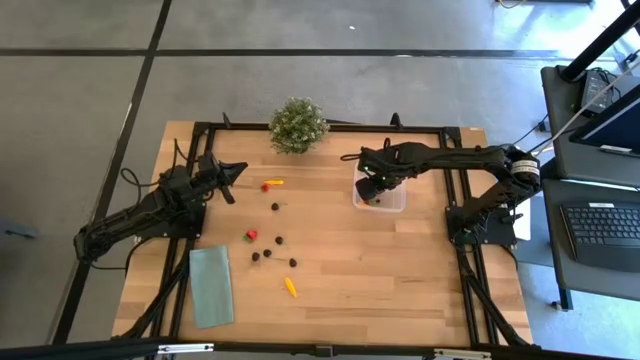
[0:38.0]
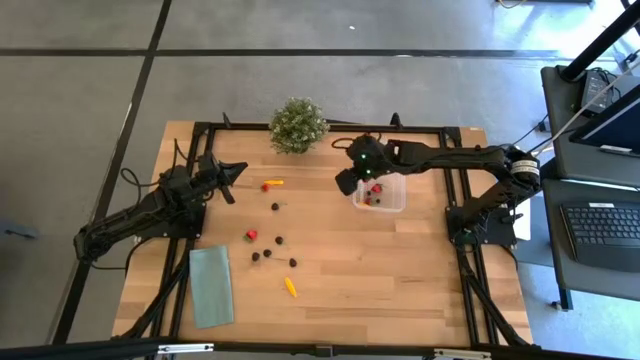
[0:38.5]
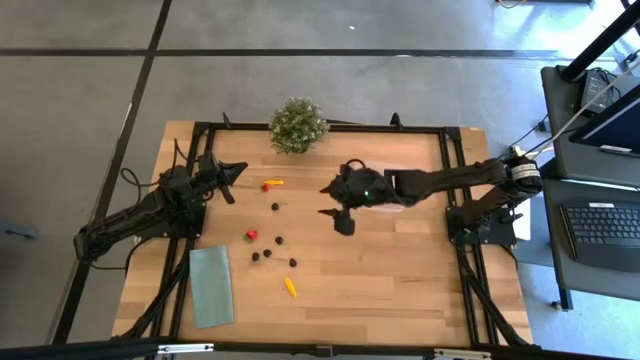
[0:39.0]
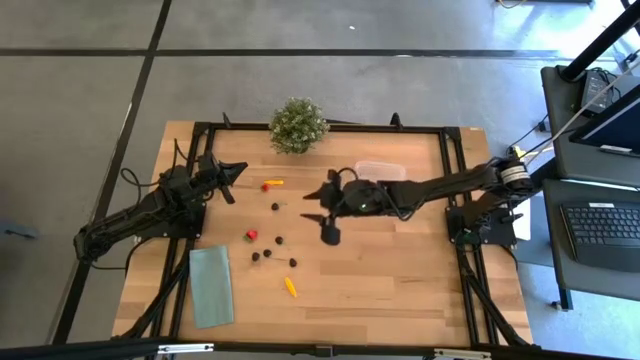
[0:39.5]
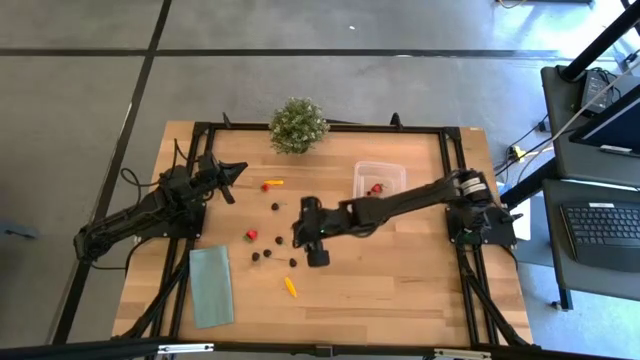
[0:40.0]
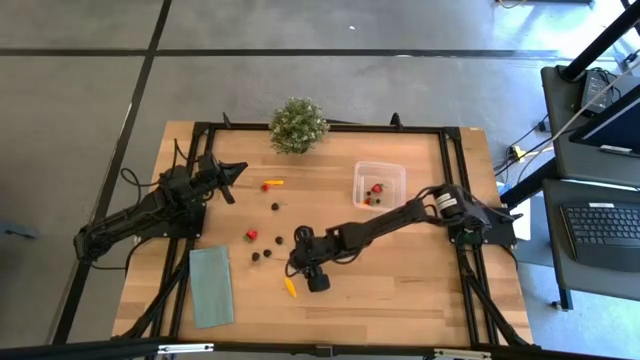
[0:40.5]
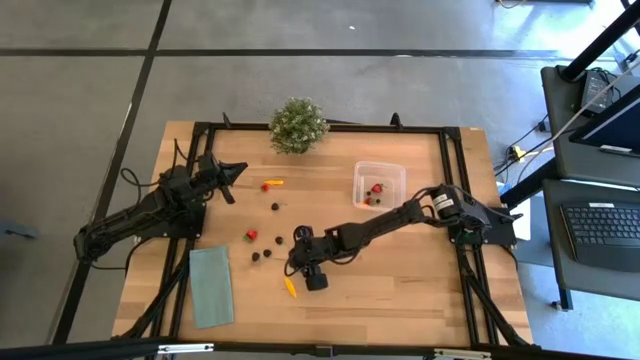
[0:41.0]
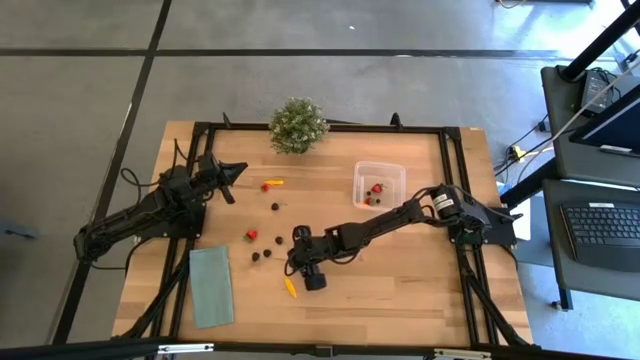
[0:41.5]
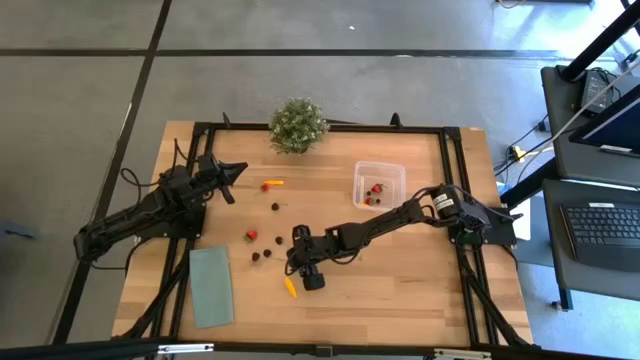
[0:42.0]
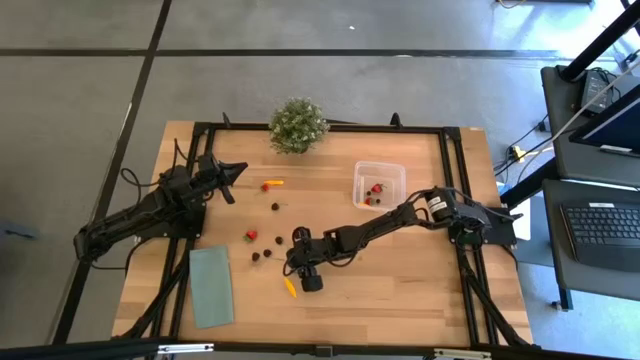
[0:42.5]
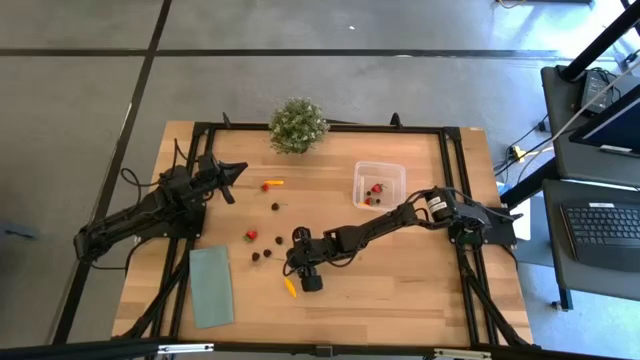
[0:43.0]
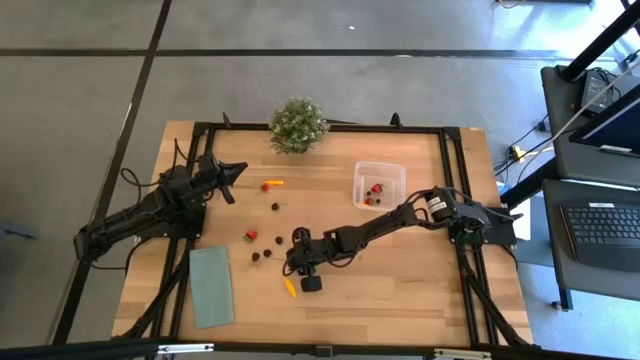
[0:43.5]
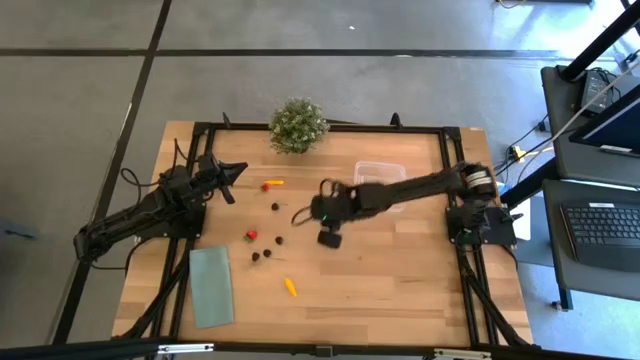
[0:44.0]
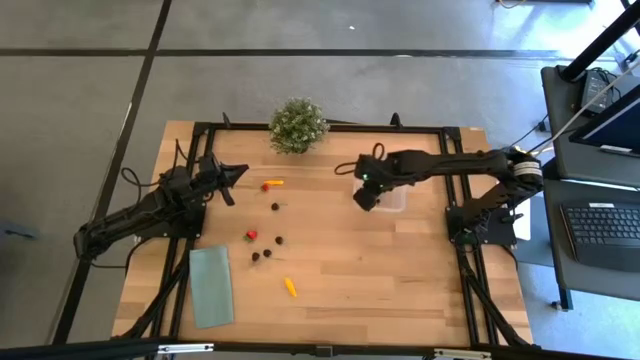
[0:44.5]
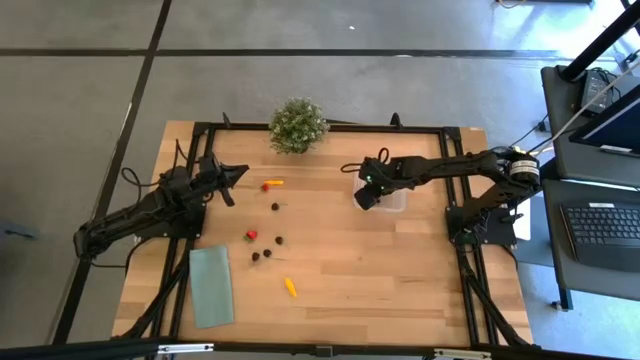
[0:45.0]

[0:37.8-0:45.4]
Task: Pick and placing Produce into tupperware
Put the right blackberry into the transparent bin

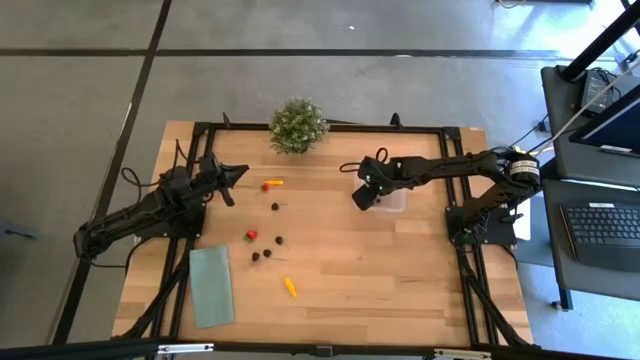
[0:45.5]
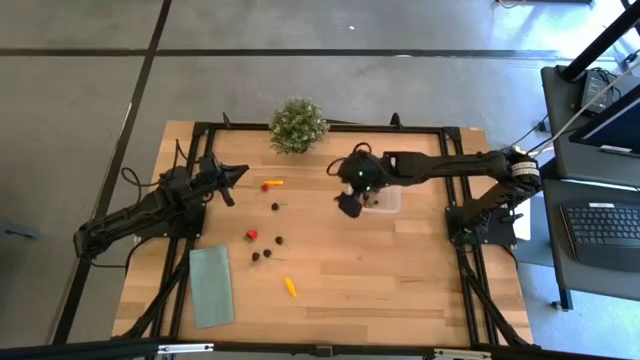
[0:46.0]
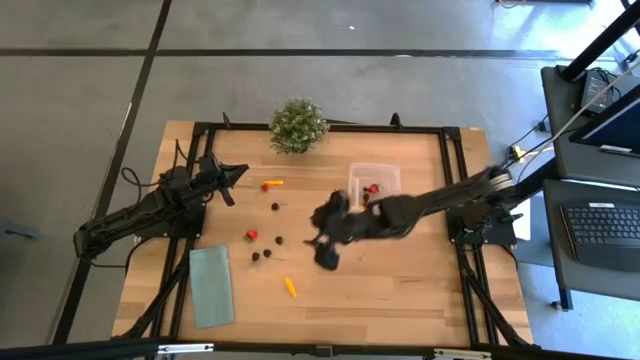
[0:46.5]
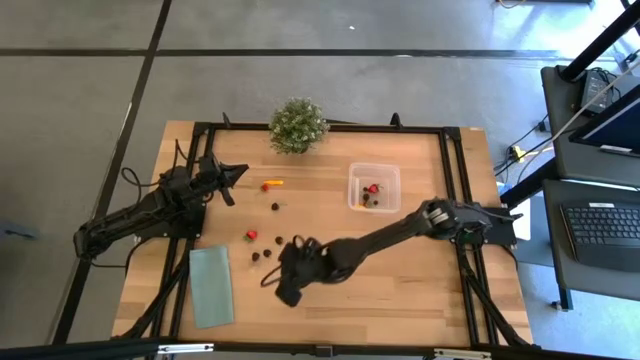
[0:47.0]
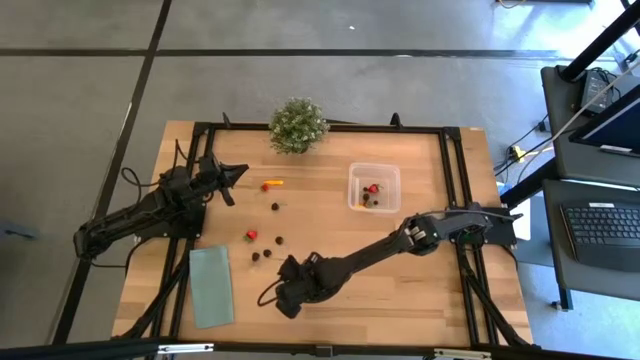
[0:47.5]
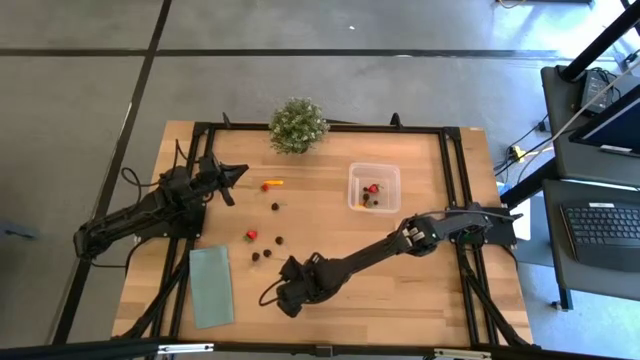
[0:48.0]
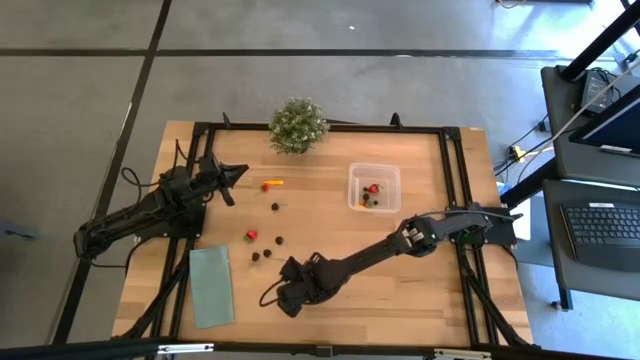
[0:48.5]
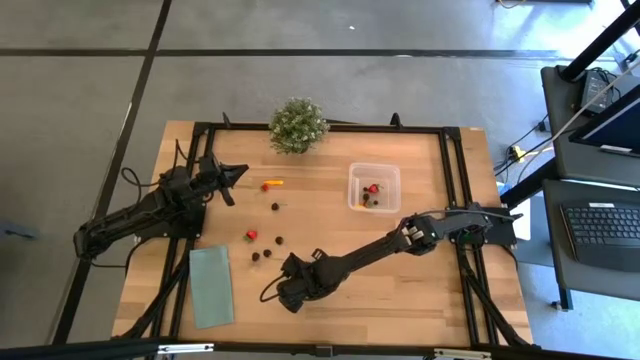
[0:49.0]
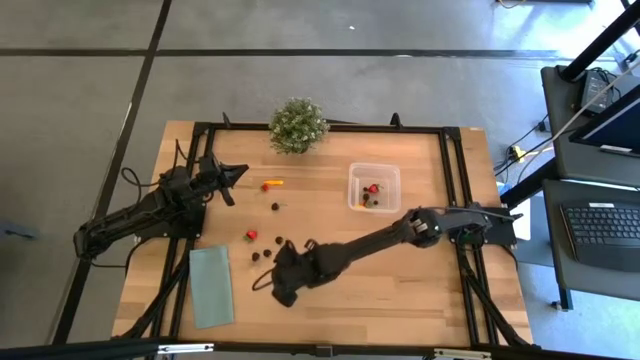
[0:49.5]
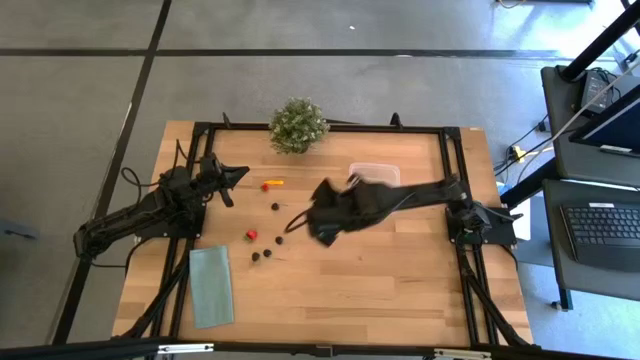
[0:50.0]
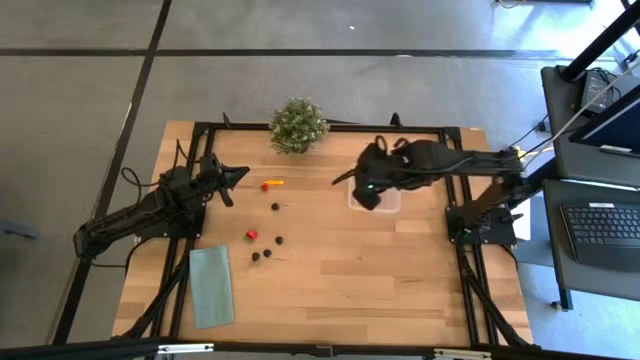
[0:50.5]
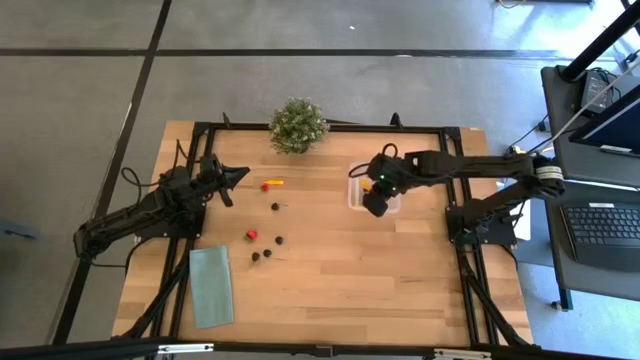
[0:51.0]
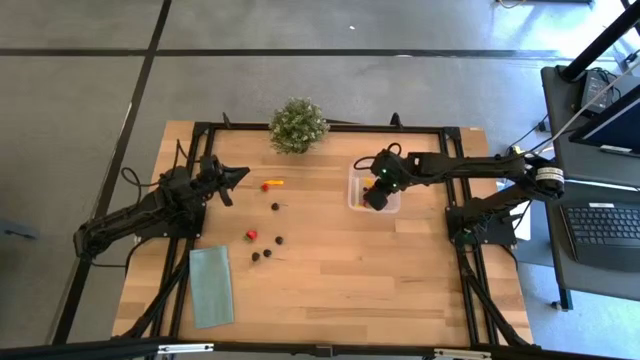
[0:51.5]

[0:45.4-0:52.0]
Put the bottom sweet corn into the transparent bin

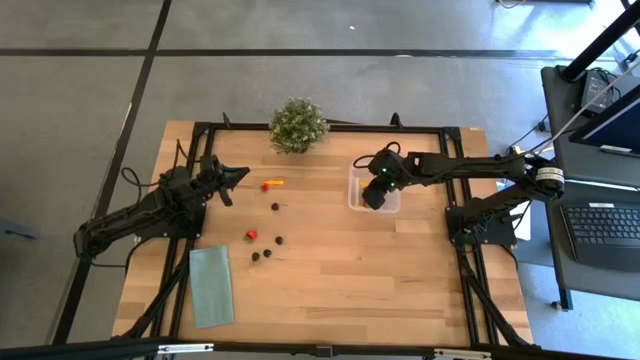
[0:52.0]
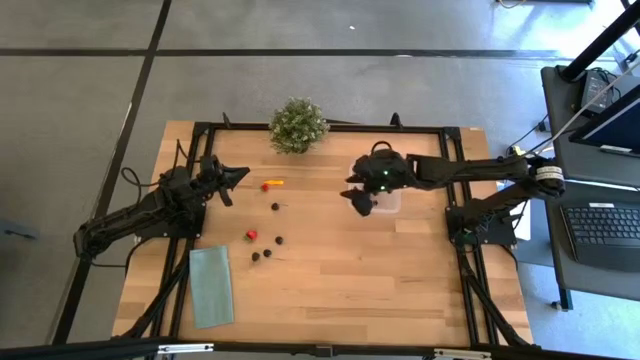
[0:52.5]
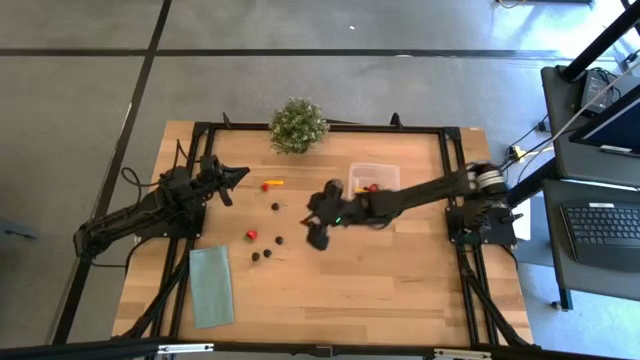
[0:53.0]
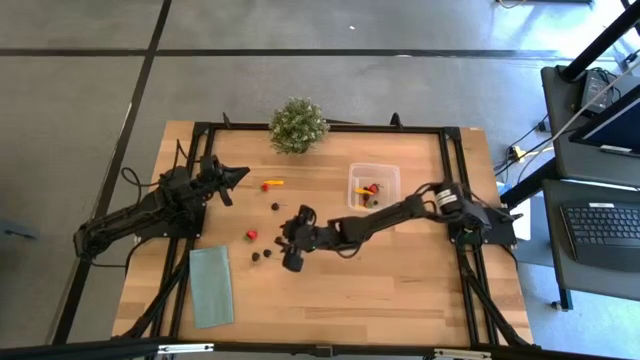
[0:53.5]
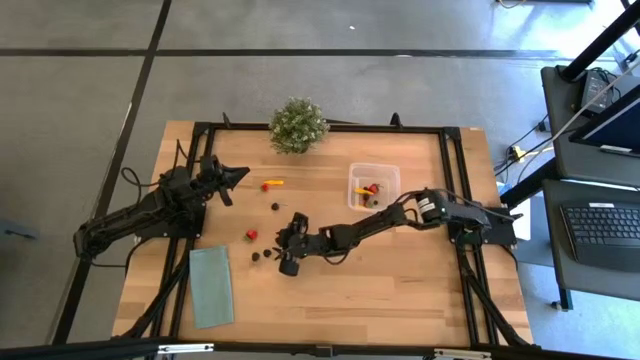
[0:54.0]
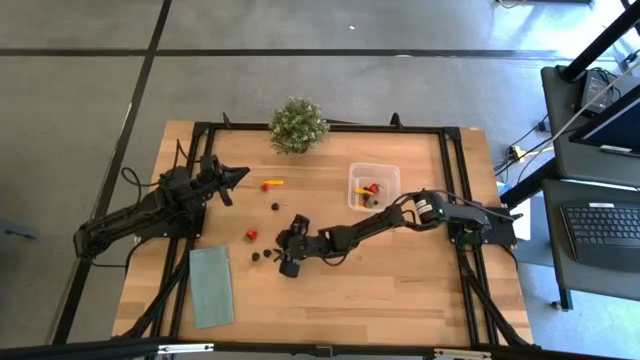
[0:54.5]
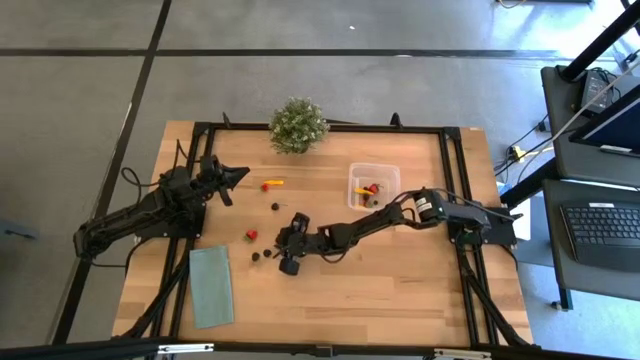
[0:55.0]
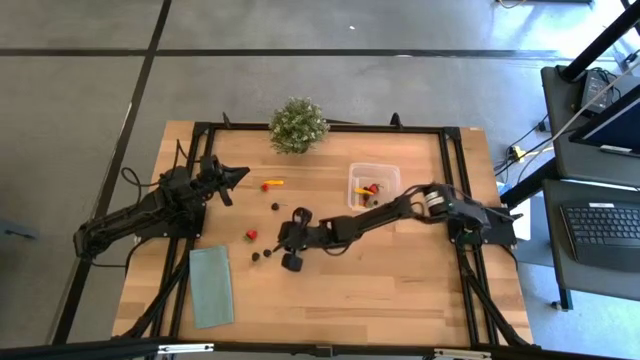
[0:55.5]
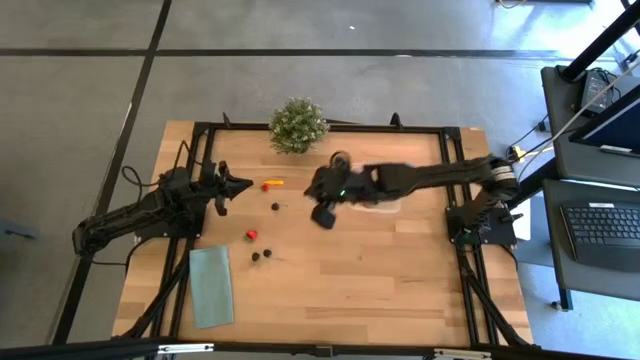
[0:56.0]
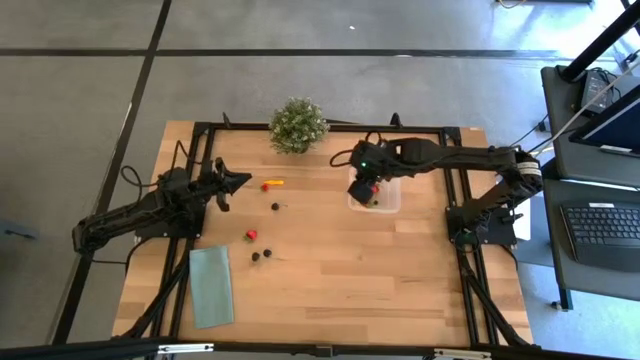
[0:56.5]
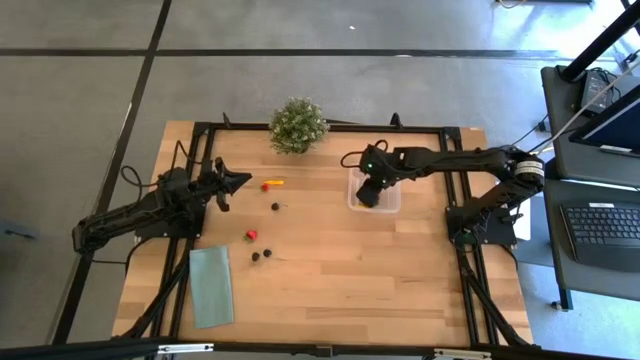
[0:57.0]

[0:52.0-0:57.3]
Put the middle black cherry into the transparent bin

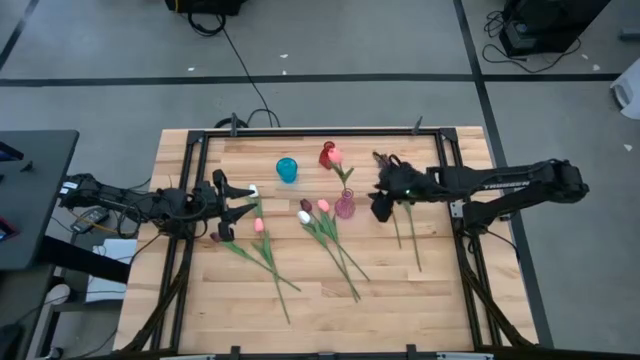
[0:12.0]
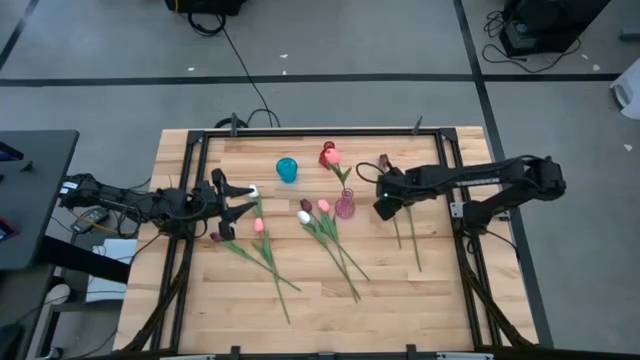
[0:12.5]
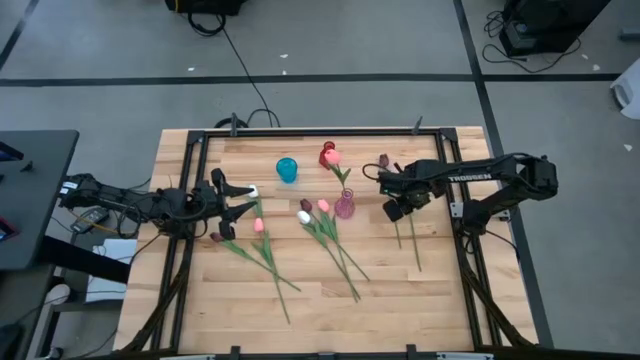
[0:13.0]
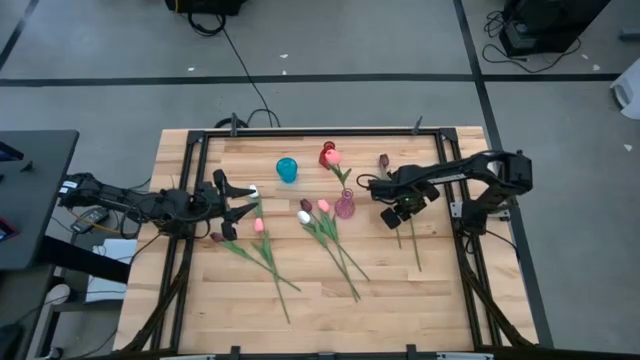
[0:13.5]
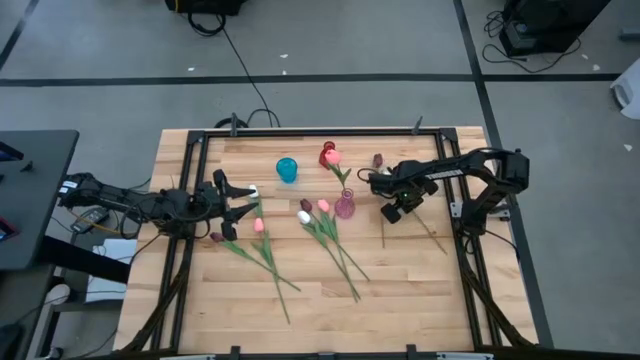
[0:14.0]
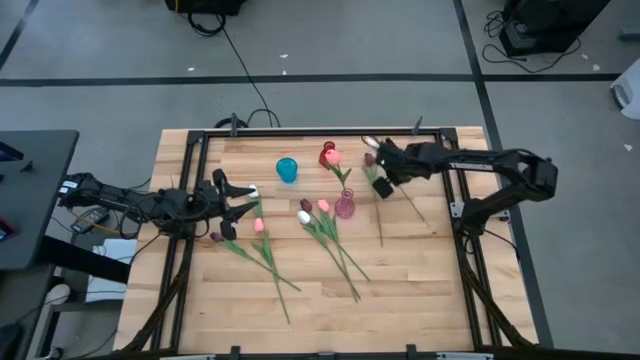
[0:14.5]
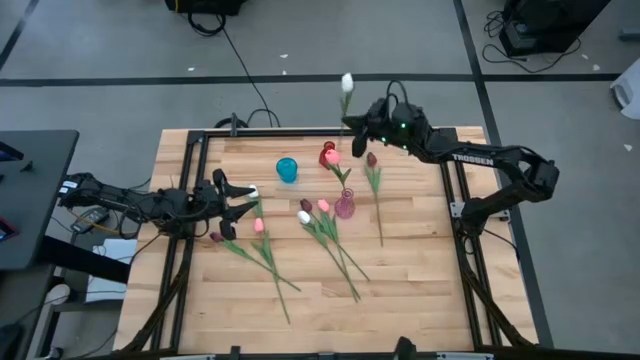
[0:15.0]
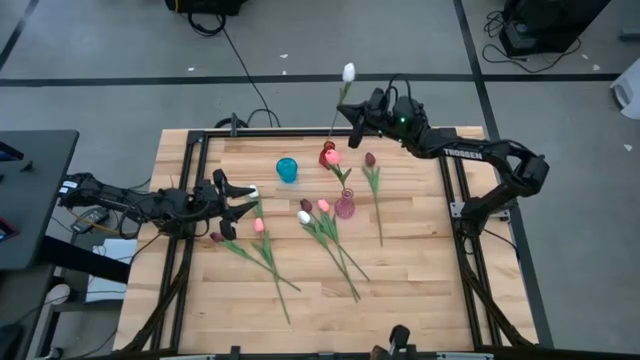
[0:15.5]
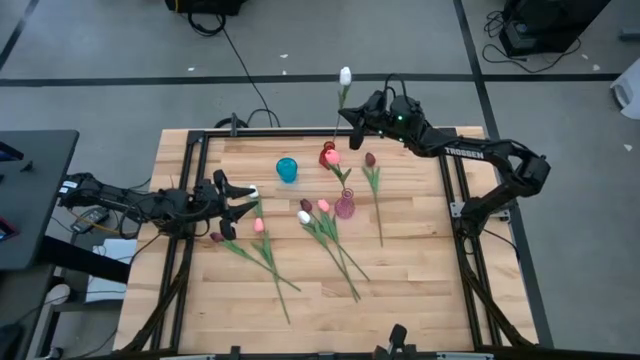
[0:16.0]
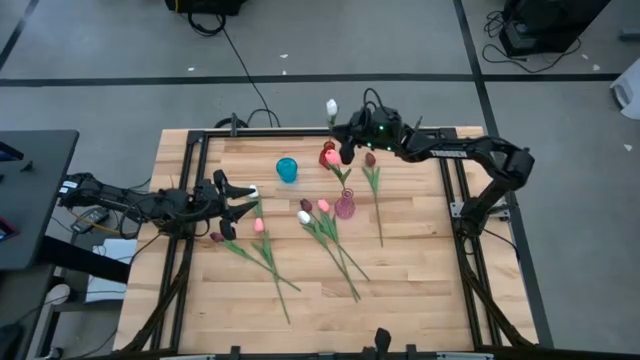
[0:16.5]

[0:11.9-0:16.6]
Task: Sort flowers into vase by color
Put the top right white tulip into the red vase
